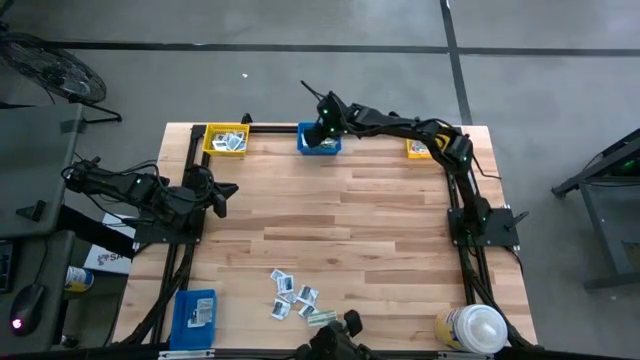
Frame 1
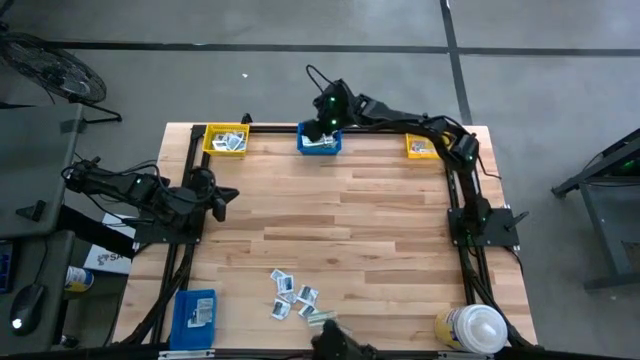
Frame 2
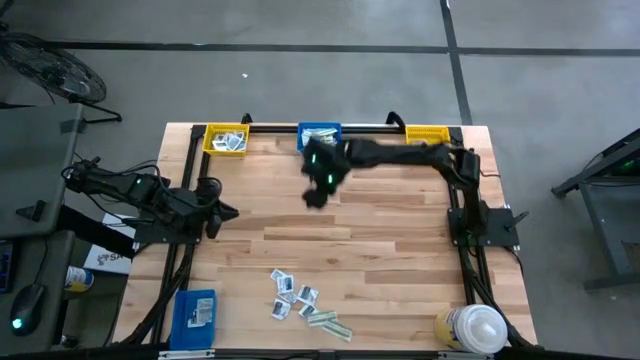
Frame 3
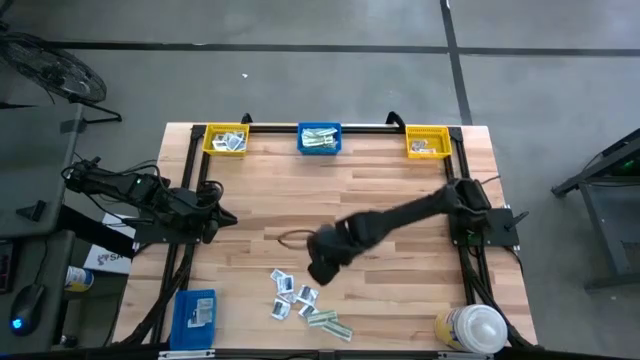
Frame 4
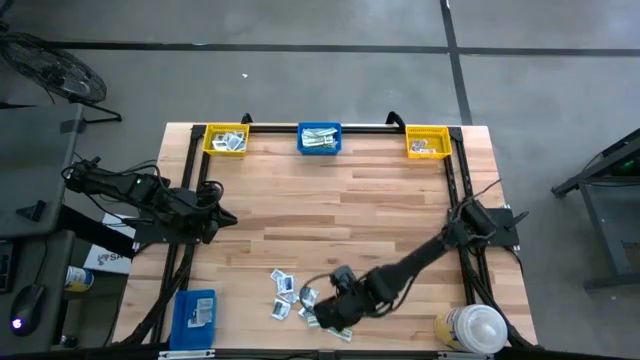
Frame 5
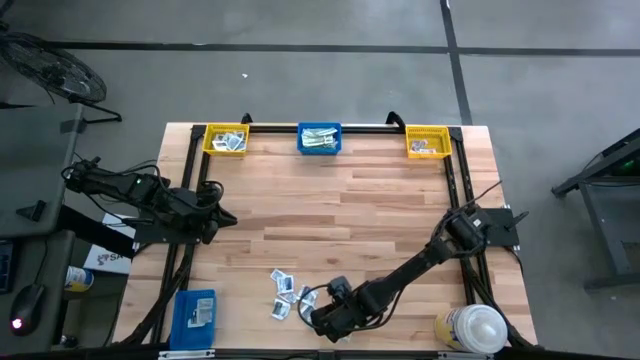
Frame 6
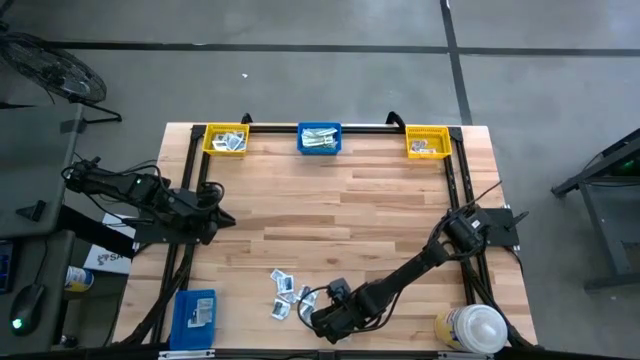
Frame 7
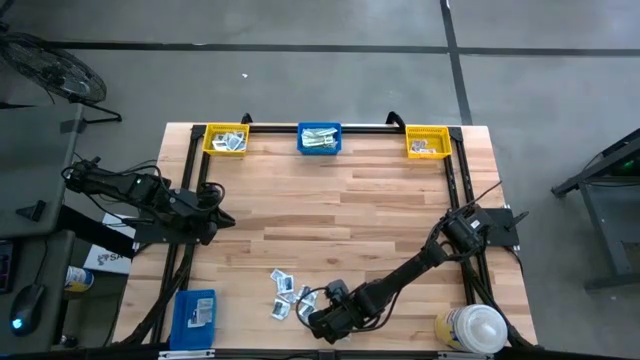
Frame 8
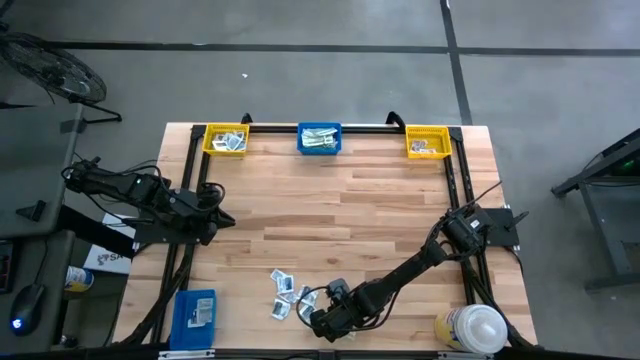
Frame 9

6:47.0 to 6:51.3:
Task: Pick & Place First Aid Supplies
Put the green bandage pack into the top blue bin

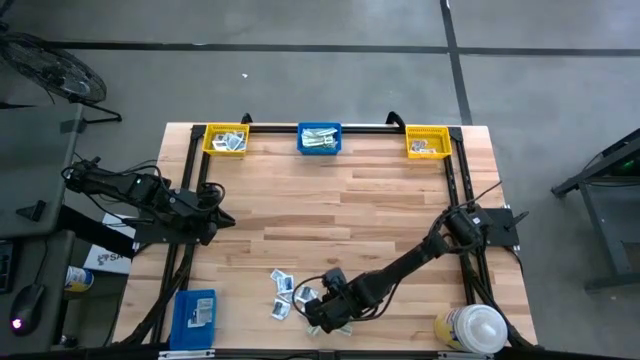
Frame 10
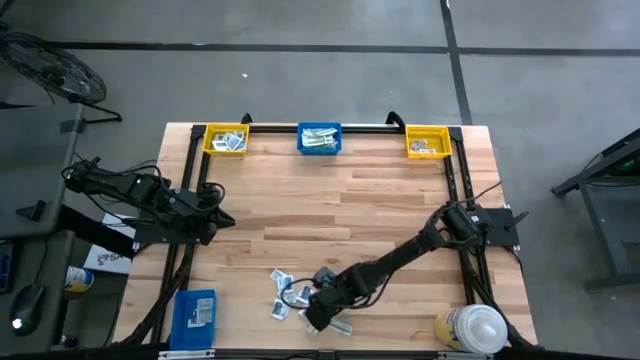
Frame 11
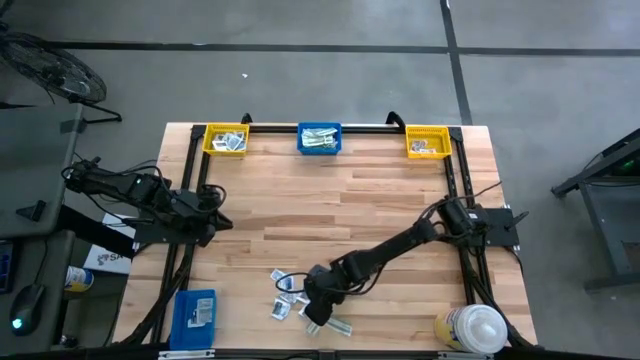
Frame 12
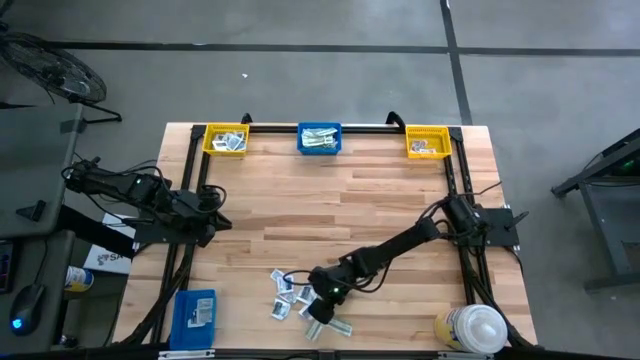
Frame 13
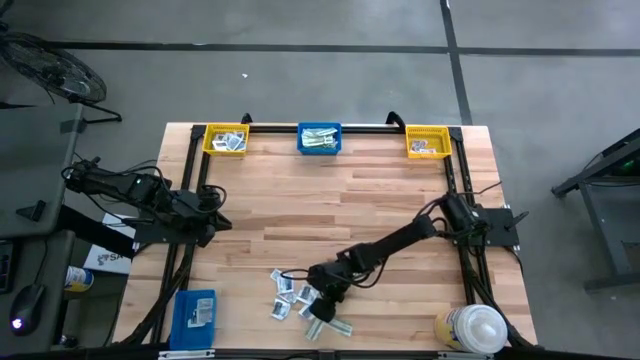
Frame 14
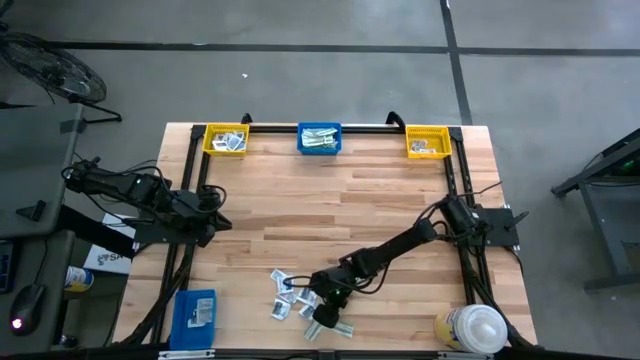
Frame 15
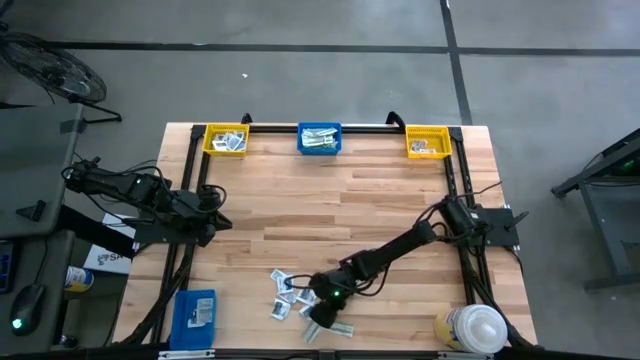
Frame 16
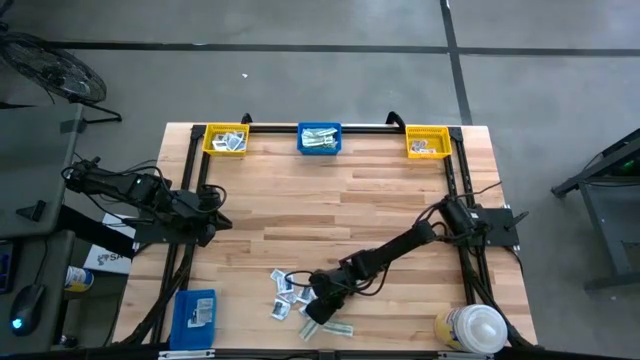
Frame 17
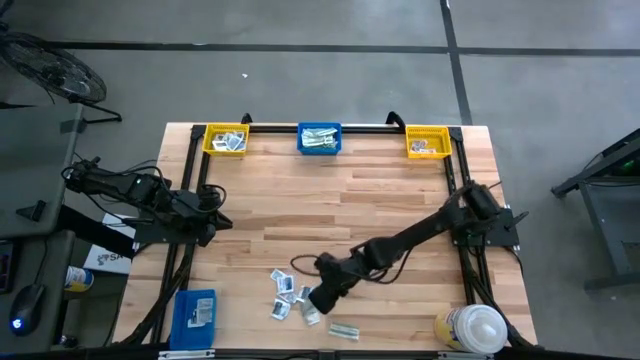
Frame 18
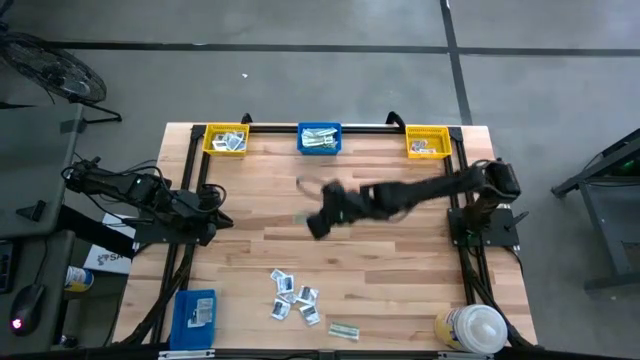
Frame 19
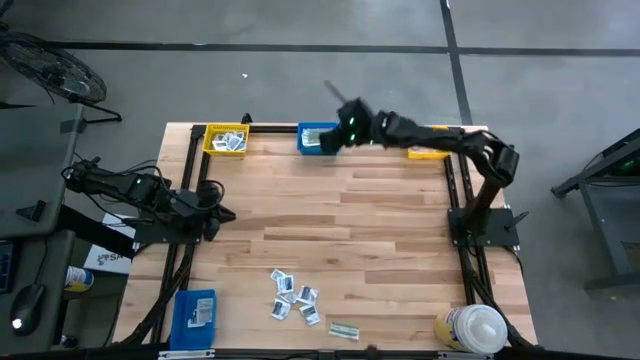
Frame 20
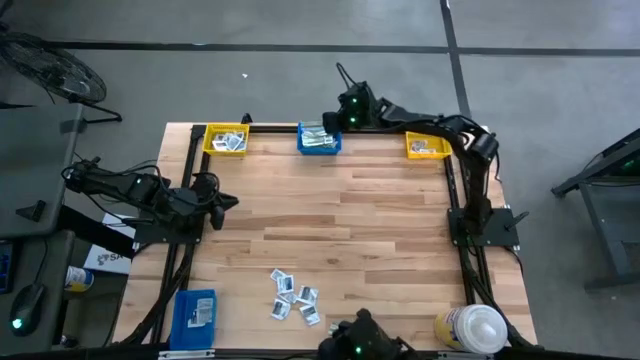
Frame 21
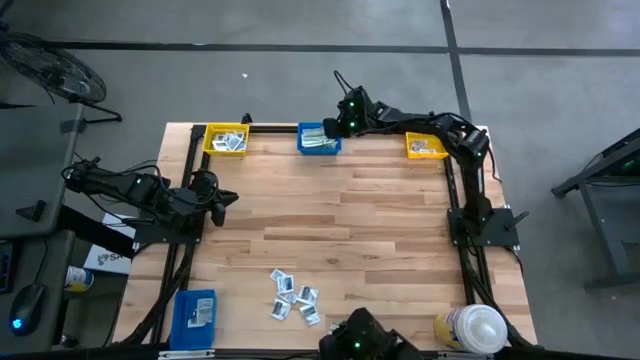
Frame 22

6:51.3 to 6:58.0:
Put the green bandage pack into the top blue bin

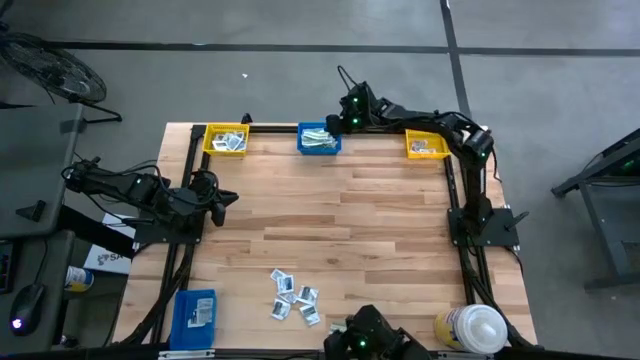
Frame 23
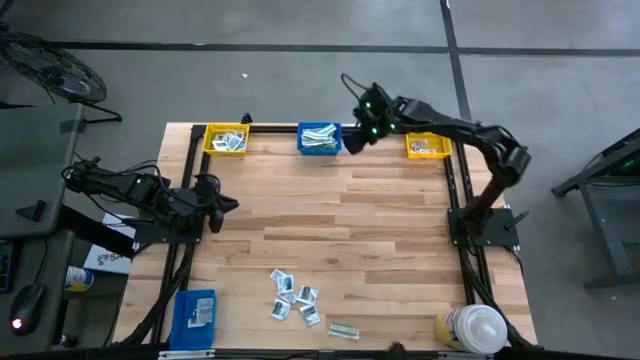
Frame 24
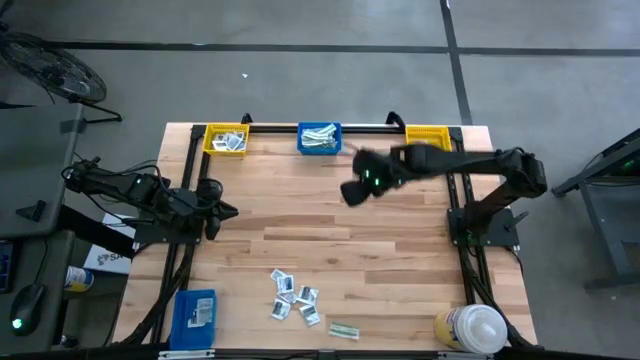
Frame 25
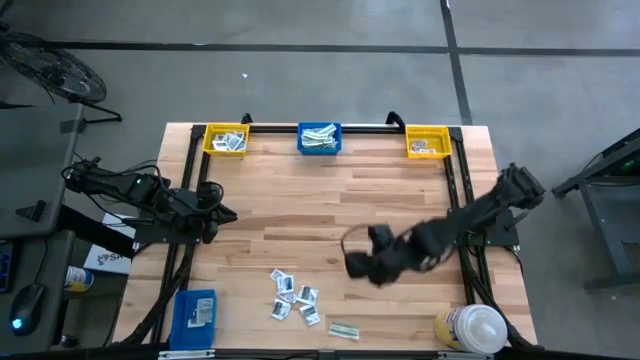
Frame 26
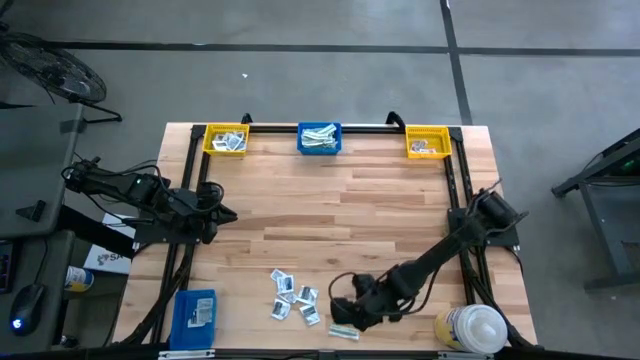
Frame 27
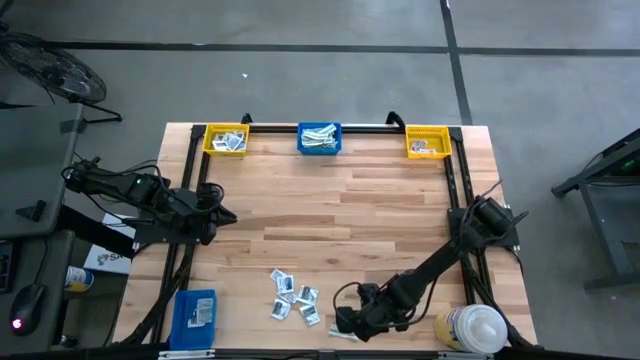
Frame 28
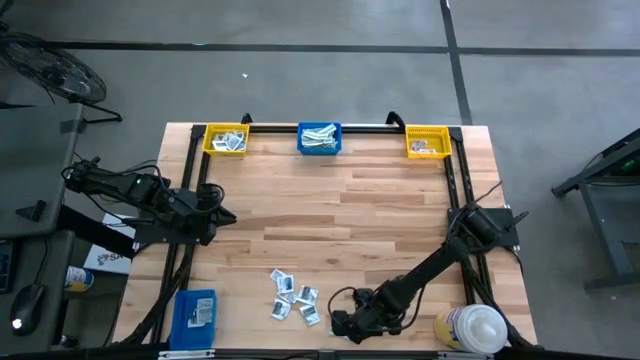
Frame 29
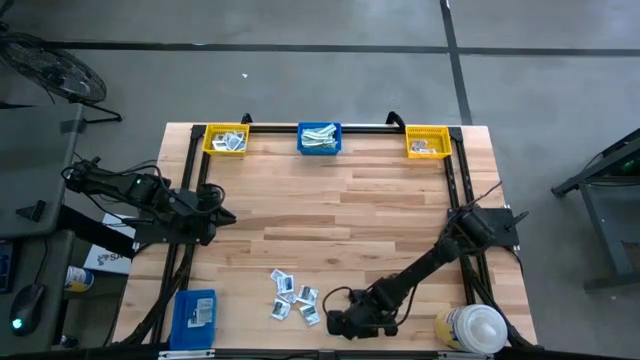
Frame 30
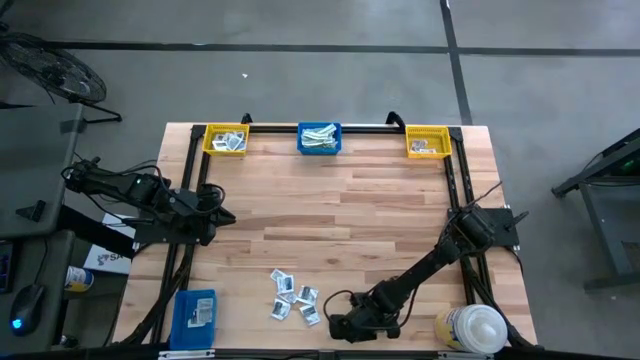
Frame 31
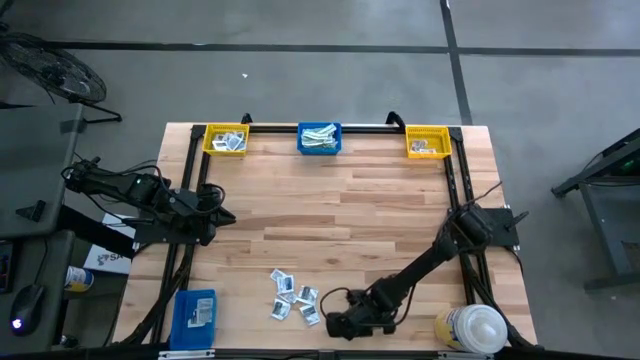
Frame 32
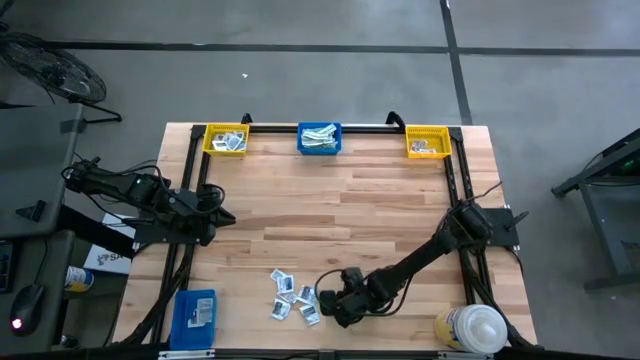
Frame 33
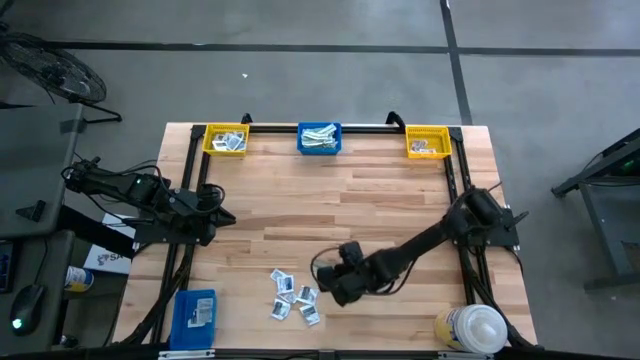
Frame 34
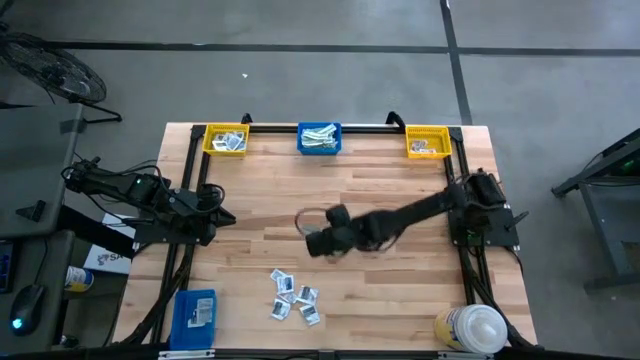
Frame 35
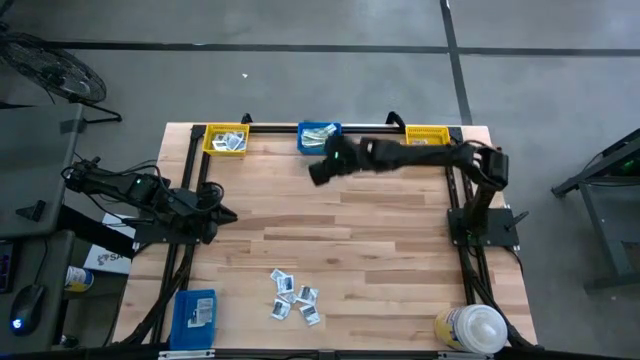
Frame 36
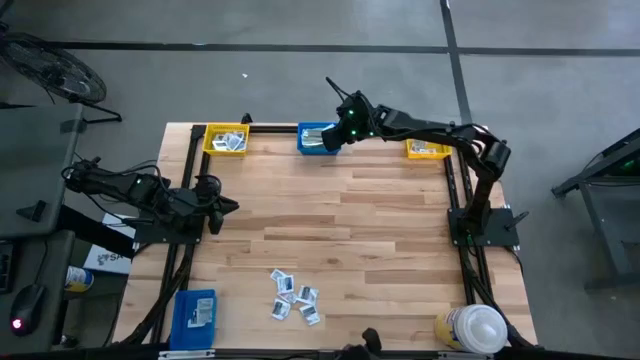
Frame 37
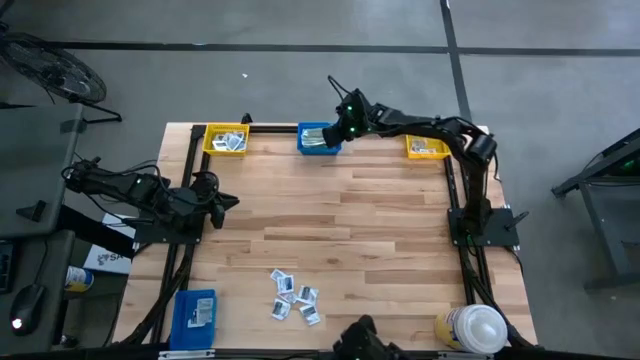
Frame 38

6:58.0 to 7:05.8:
Put the green bandage pack into the top blue bin

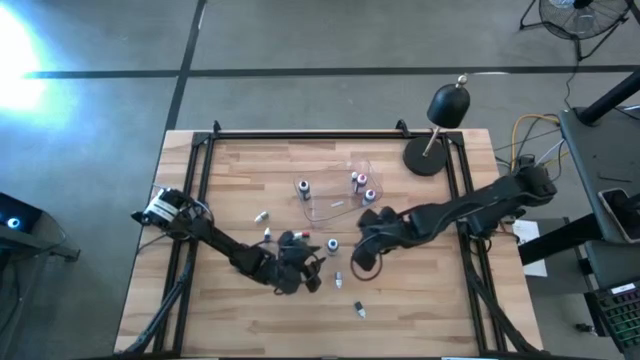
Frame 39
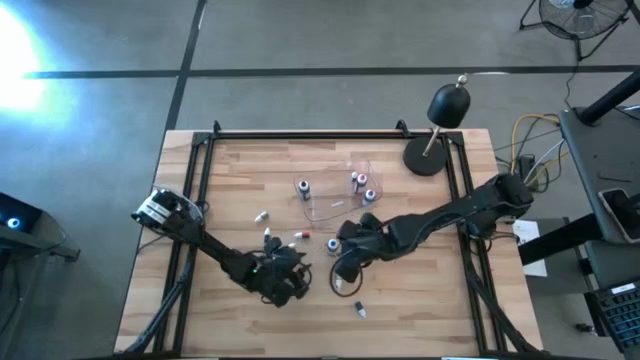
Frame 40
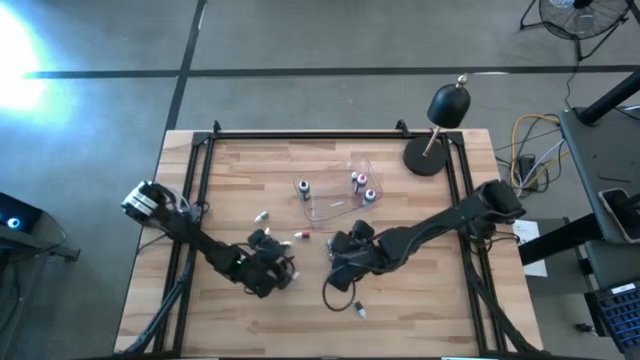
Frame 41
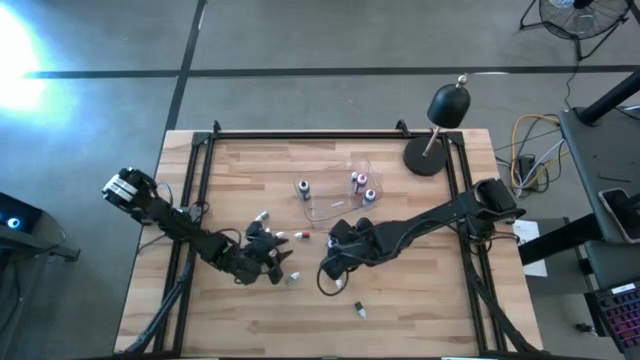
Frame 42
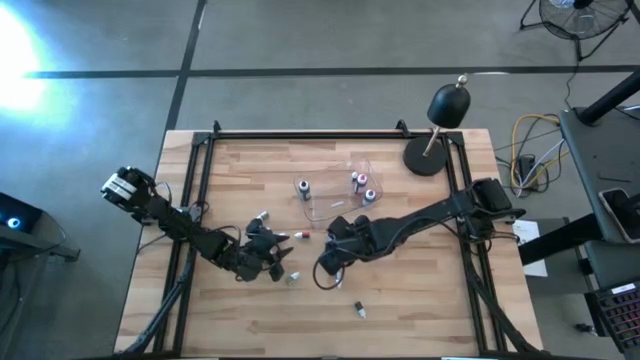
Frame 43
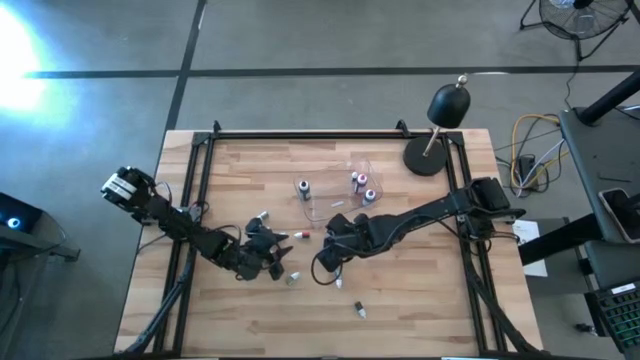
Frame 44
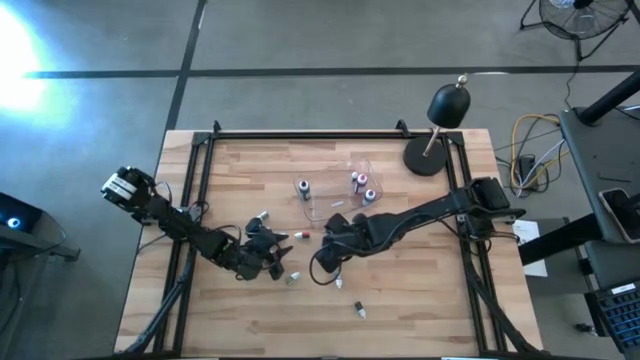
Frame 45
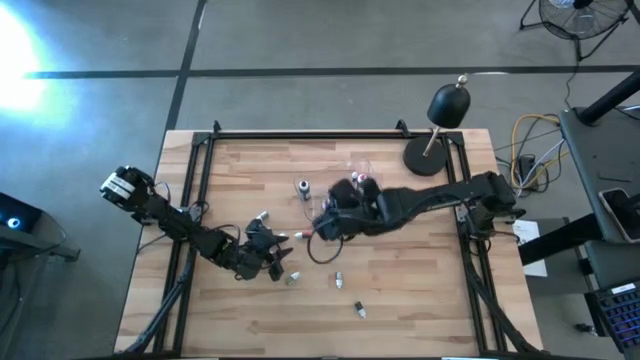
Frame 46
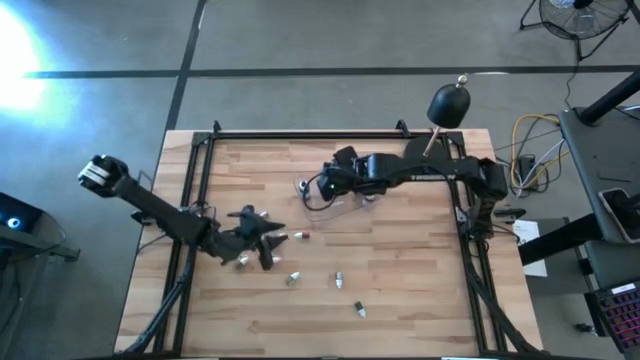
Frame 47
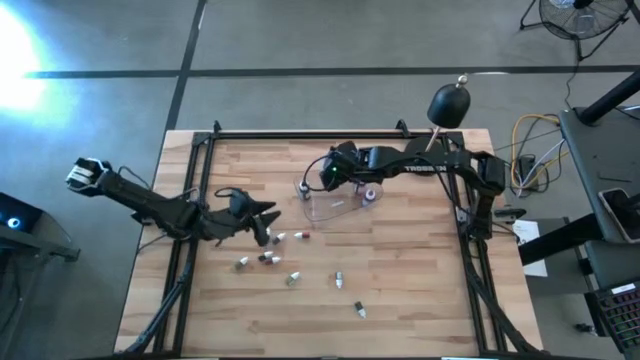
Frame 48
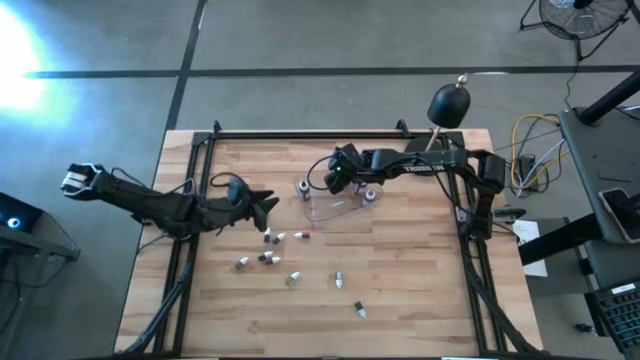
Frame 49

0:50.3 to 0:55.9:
Task: Pick & Place food coloring
Put the big blue food coloring bottle into the transparent bin
